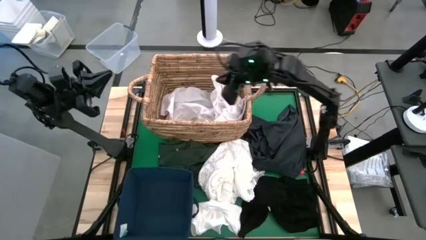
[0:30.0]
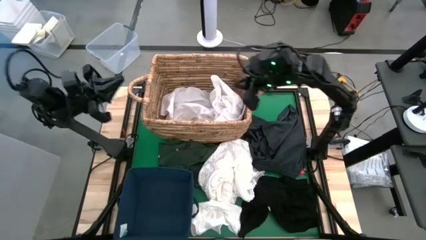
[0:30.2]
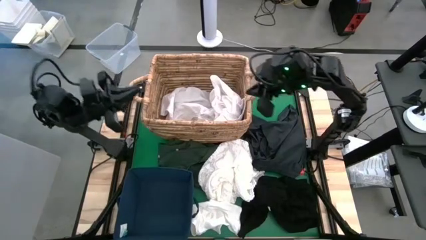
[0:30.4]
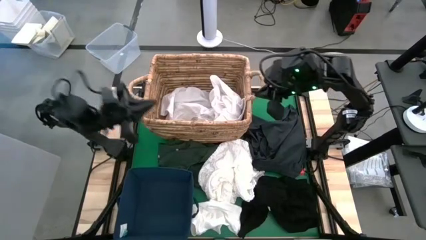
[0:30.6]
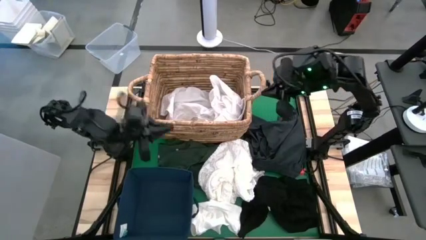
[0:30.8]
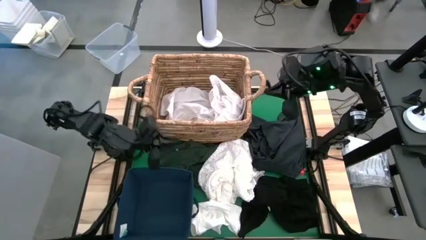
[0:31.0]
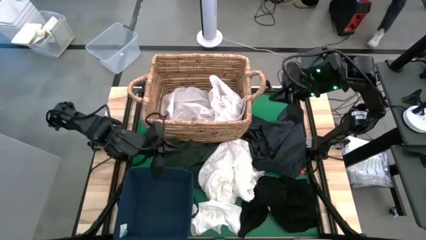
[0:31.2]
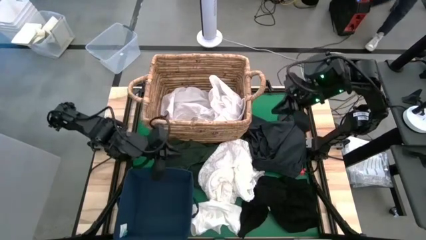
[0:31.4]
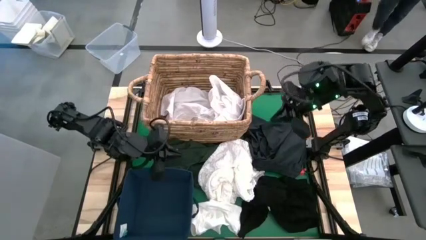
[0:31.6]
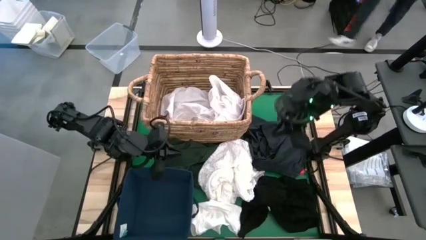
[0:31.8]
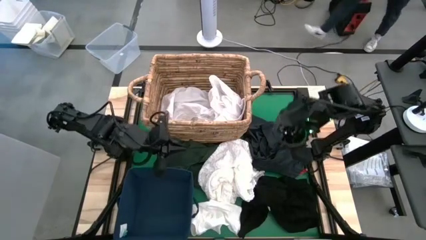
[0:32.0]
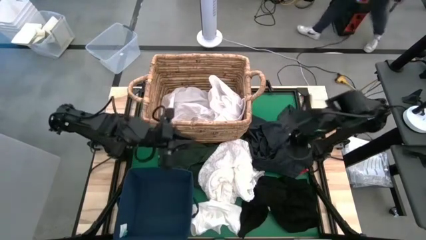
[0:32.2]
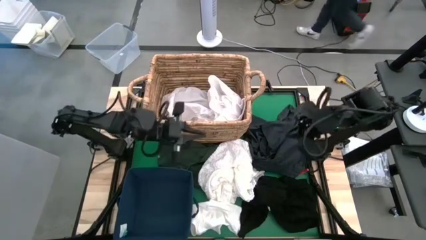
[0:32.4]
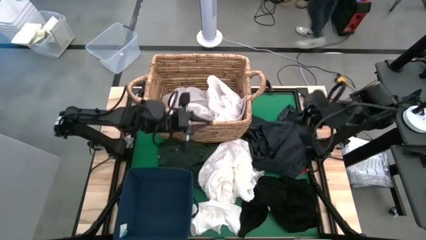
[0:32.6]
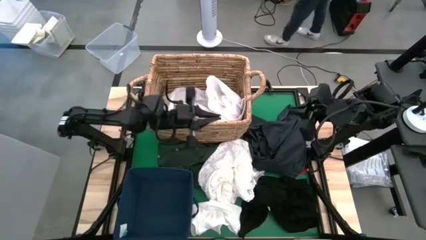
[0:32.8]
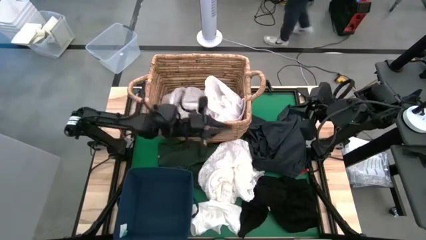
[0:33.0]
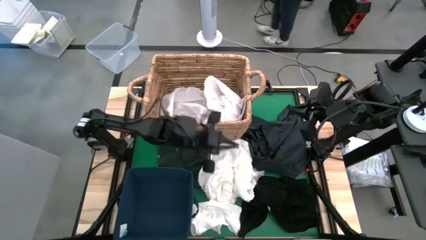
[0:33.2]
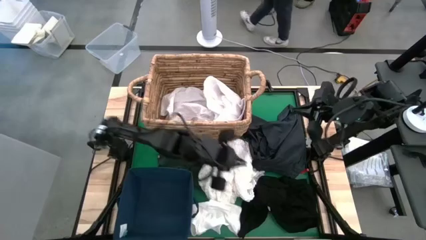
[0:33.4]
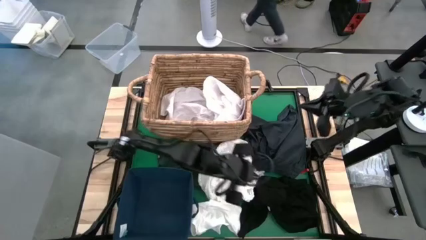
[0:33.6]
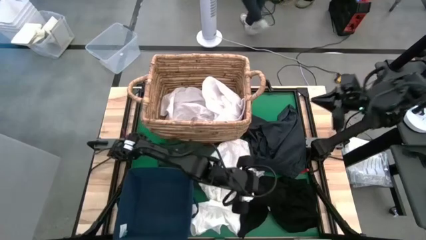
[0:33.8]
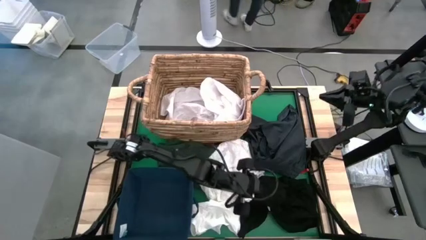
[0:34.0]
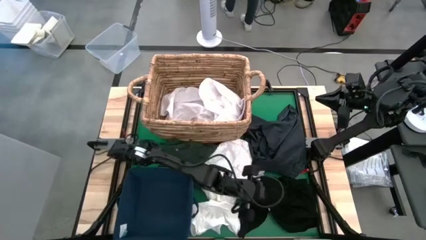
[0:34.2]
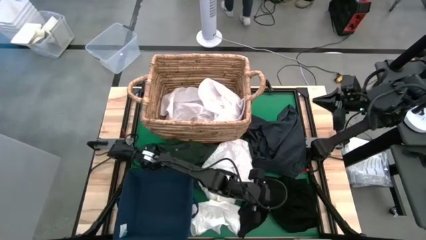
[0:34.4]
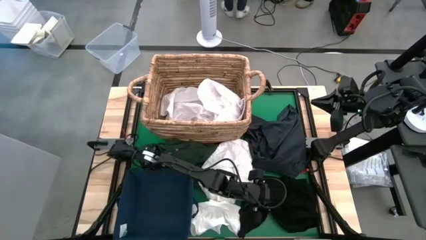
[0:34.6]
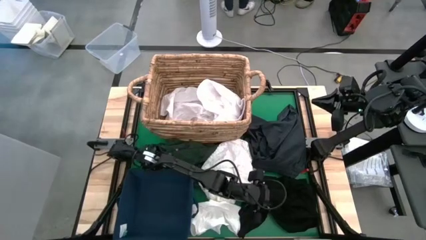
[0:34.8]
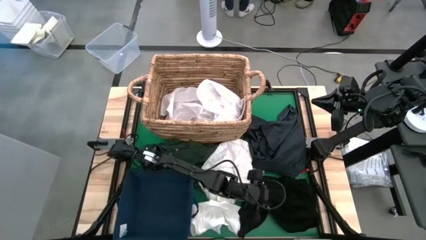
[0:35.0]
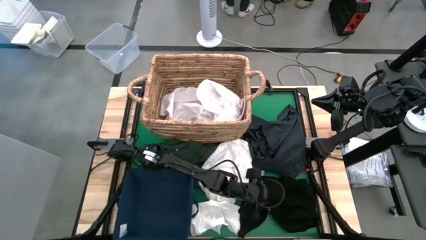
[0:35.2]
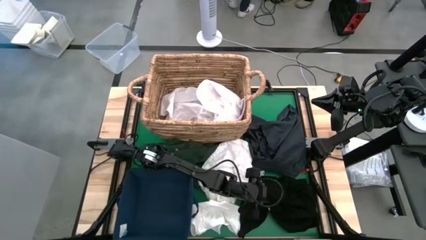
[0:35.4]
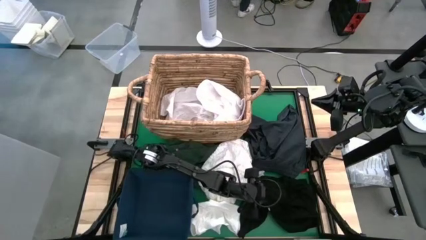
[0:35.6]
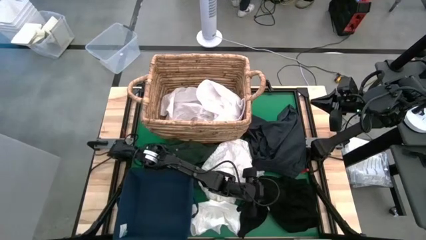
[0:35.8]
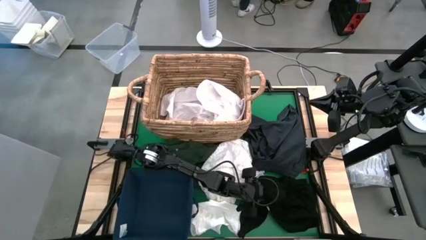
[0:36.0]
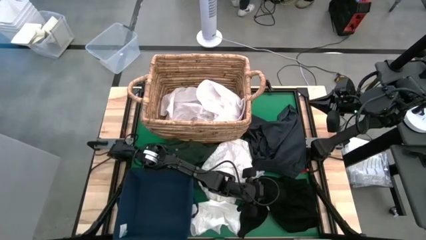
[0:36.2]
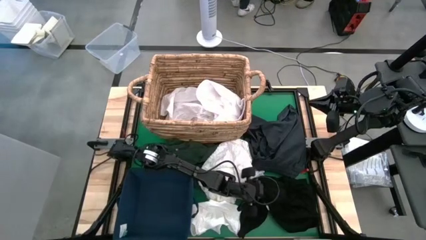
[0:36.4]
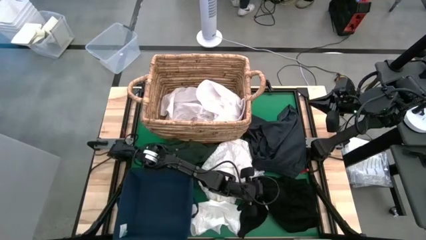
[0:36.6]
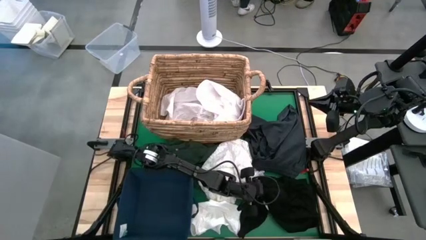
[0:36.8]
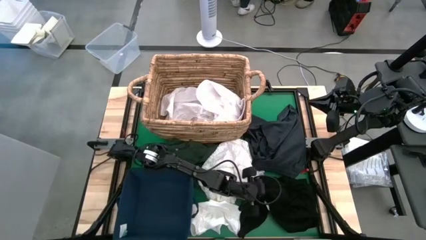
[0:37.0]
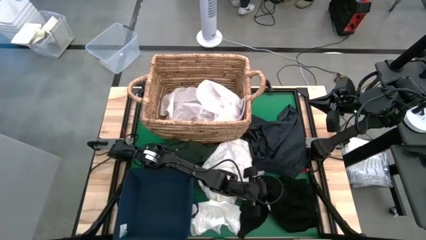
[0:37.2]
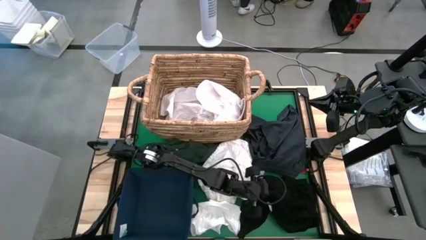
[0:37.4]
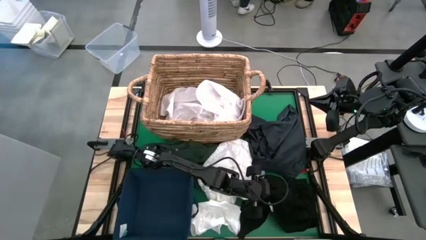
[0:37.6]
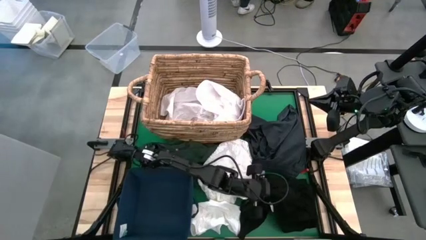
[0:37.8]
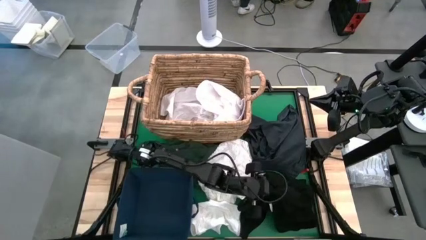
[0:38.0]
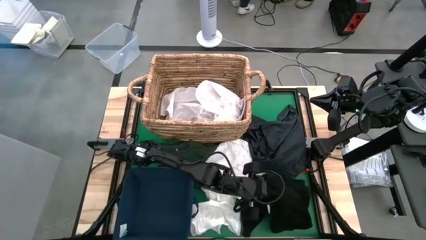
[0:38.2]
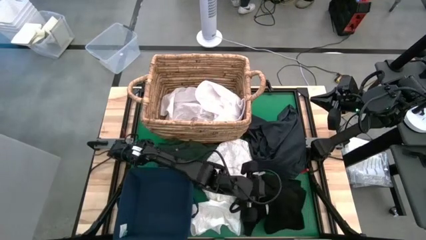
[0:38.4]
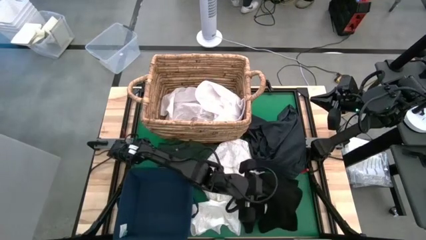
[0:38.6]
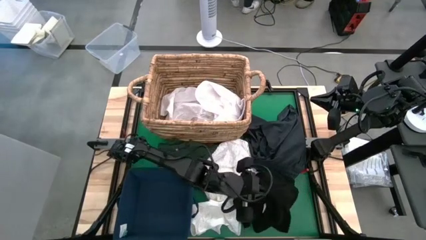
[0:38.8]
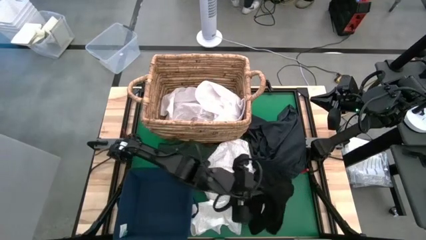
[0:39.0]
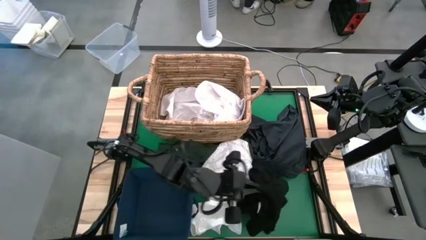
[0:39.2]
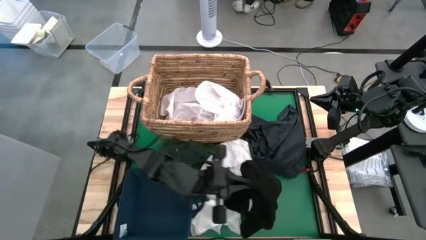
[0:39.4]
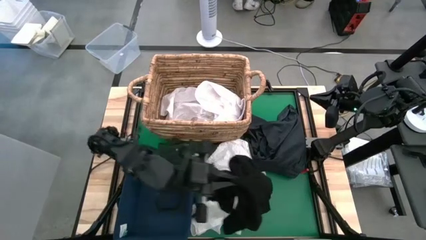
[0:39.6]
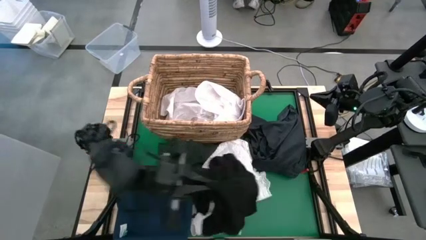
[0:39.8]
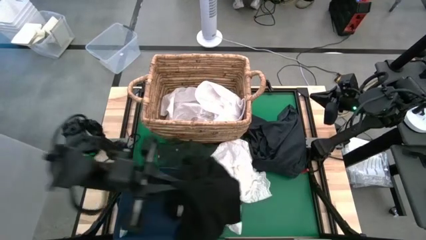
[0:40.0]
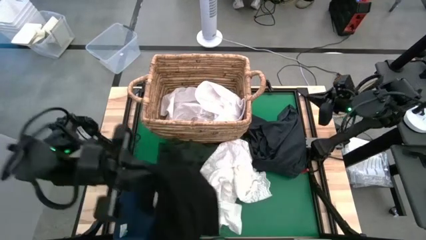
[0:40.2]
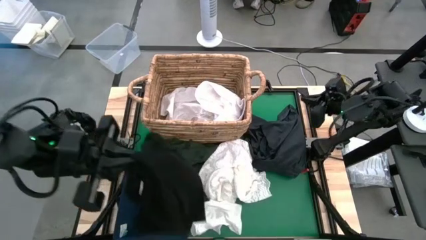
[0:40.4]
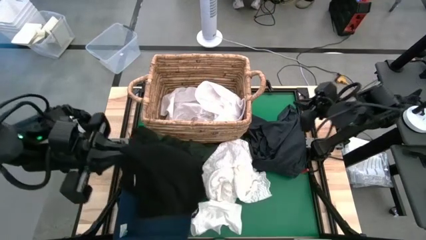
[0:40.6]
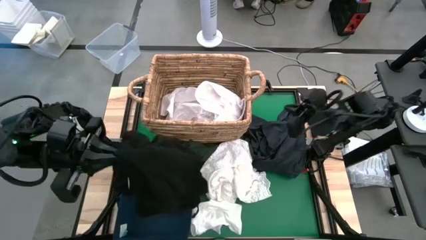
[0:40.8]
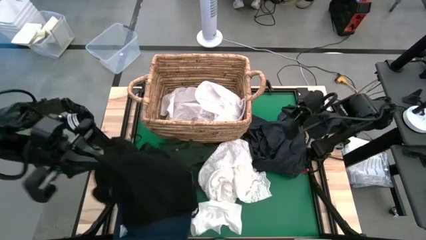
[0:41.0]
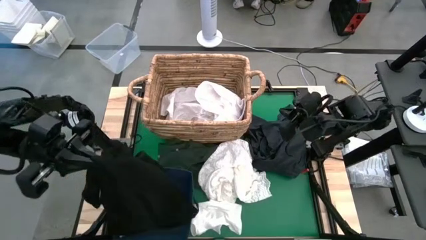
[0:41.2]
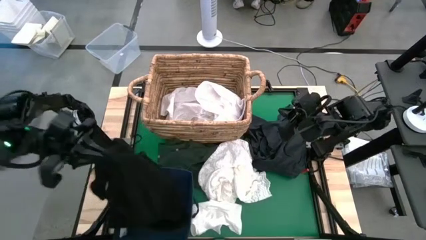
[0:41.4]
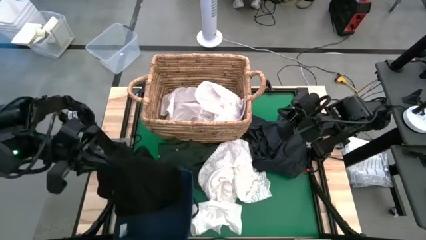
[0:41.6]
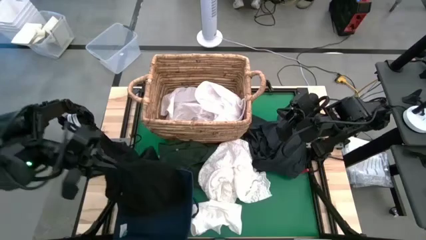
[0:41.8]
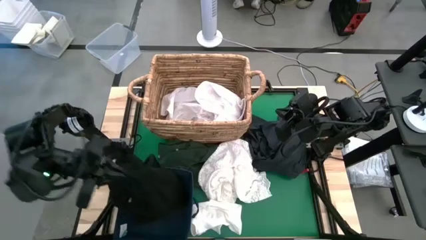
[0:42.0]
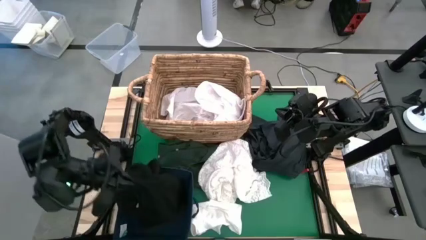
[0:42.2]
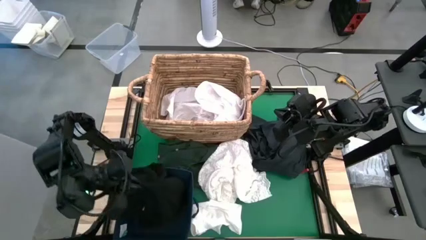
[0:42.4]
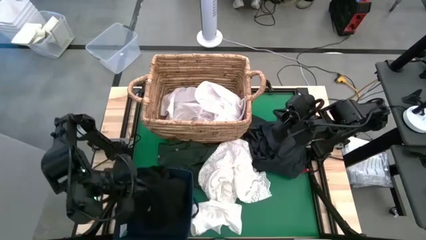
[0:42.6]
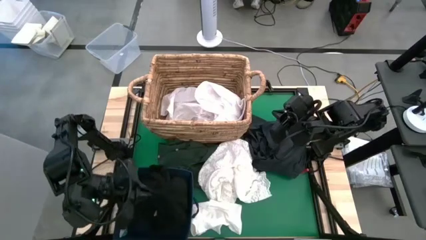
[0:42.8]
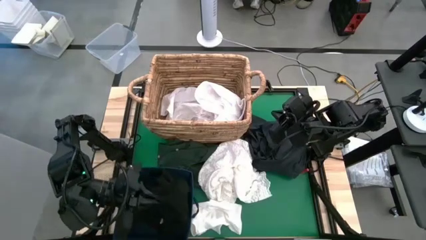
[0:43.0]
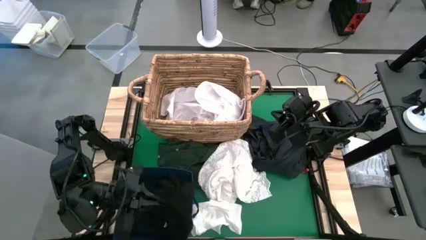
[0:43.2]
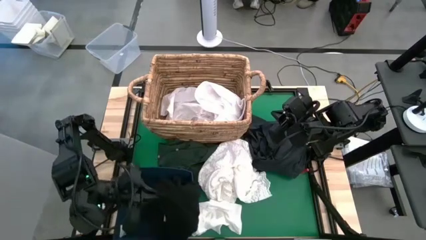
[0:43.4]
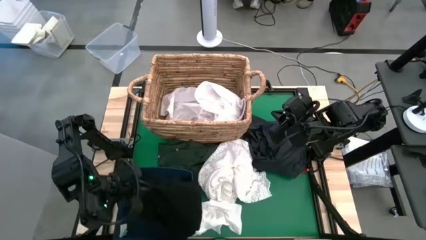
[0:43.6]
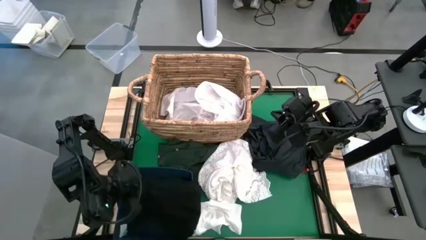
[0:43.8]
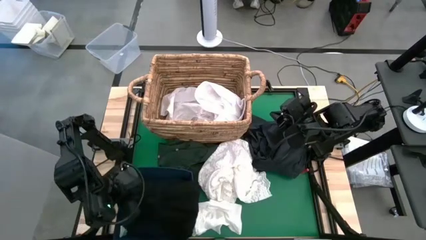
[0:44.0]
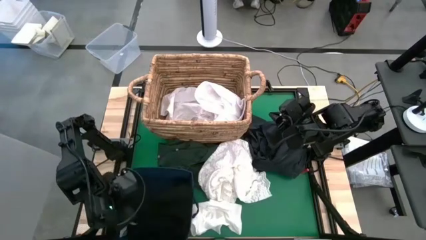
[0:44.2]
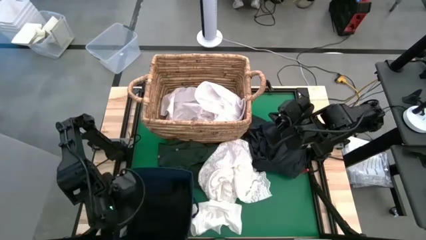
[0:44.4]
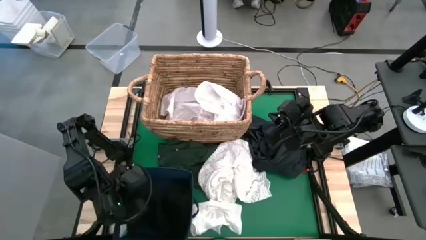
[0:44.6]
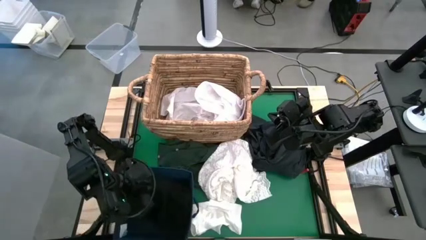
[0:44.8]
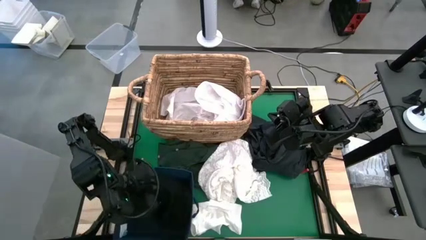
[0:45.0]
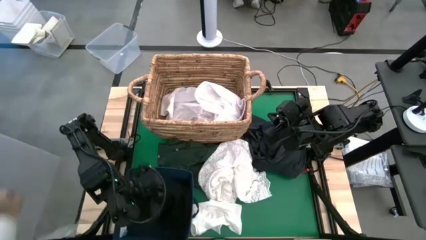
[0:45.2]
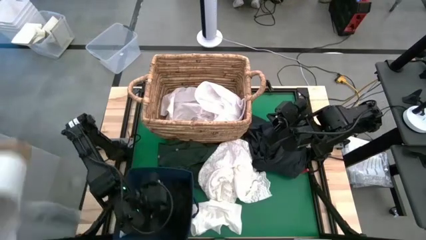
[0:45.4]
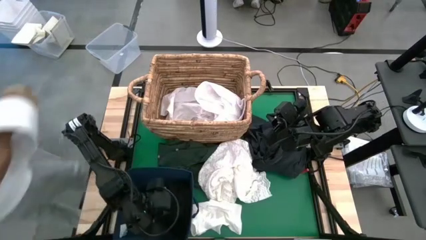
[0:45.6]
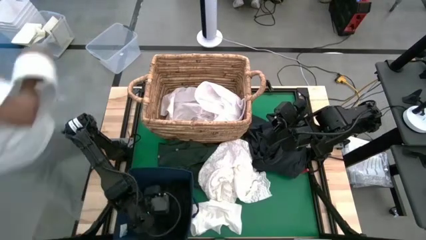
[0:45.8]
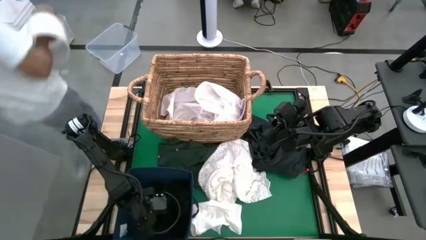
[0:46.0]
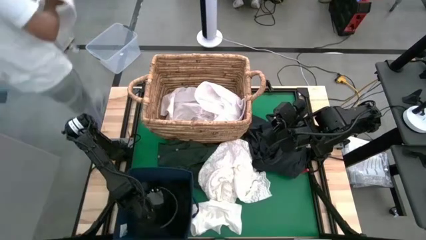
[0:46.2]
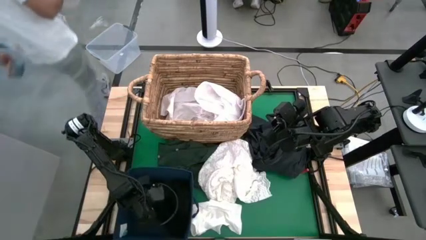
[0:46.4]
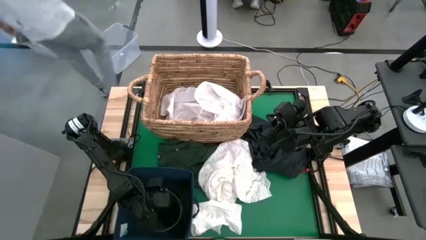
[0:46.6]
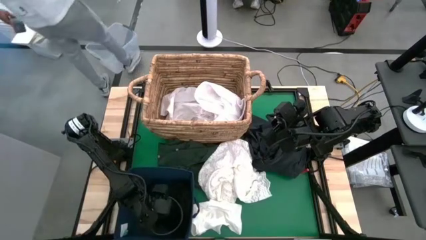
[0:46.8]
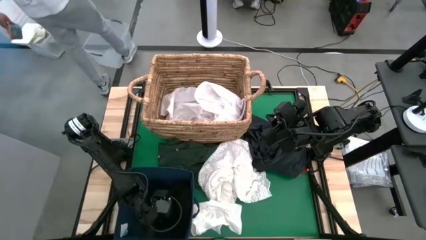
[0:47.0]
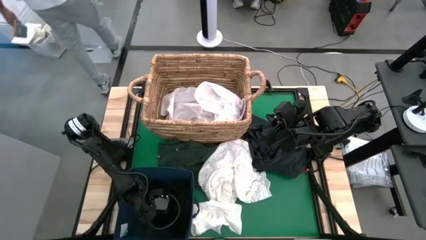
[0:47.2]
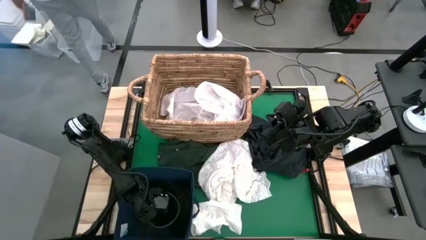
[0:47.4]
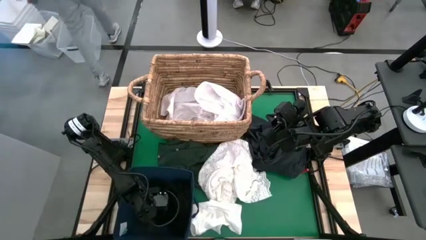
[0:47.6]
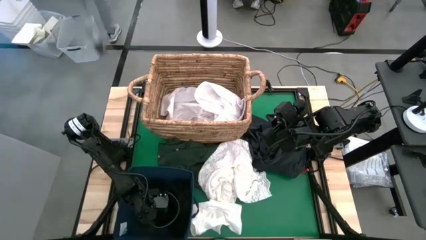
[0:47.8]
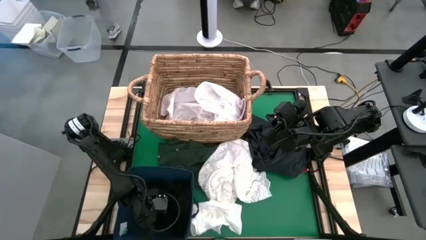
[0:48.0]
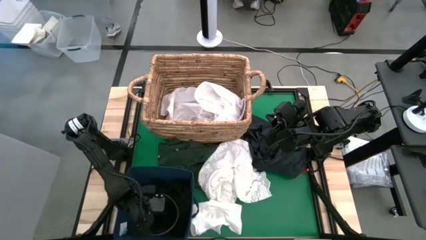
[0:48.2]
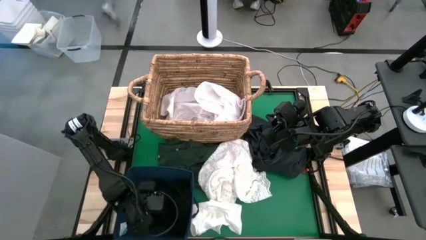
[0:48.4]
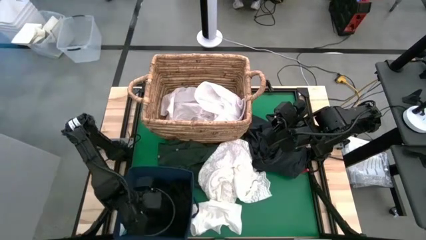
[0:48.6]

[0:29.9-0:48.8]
Put the black shirt into the laundry bin
